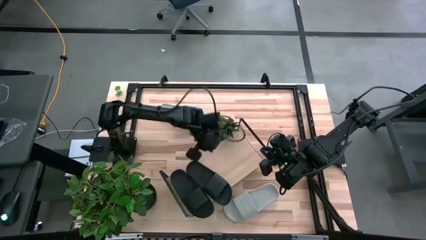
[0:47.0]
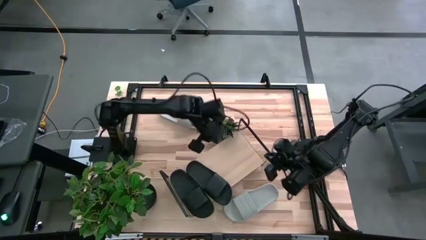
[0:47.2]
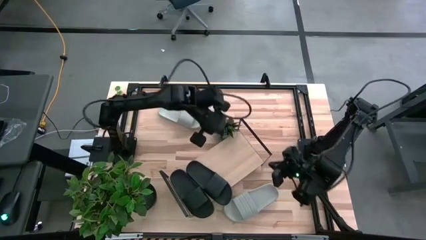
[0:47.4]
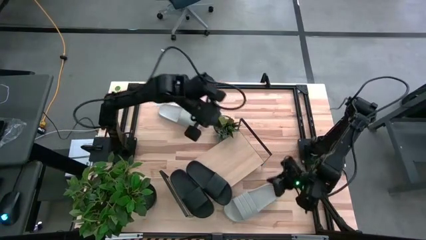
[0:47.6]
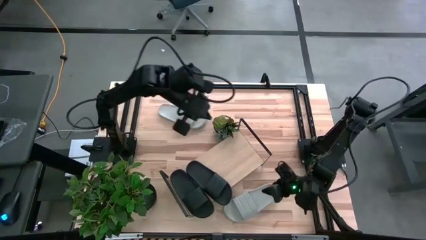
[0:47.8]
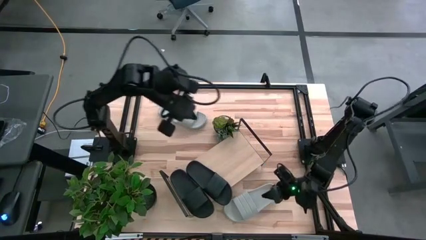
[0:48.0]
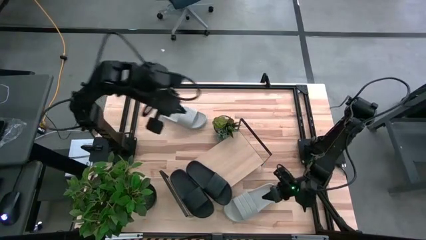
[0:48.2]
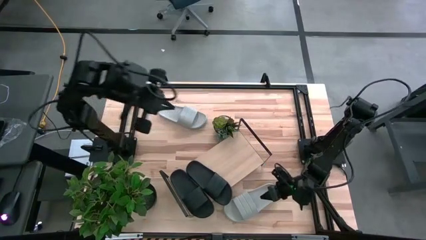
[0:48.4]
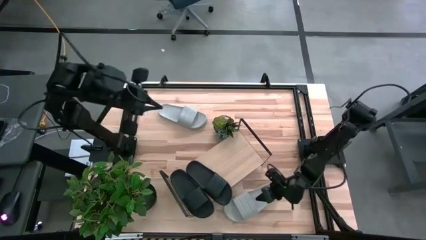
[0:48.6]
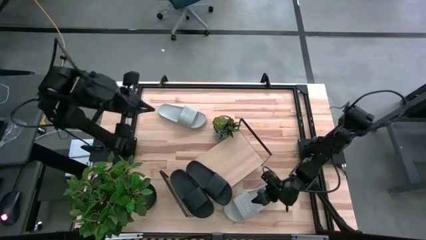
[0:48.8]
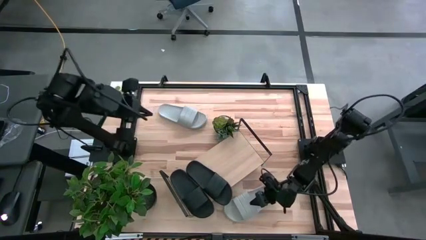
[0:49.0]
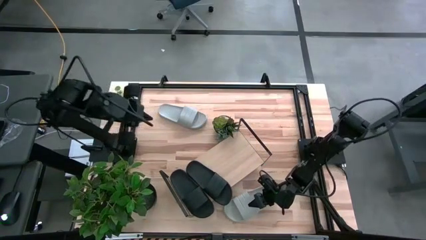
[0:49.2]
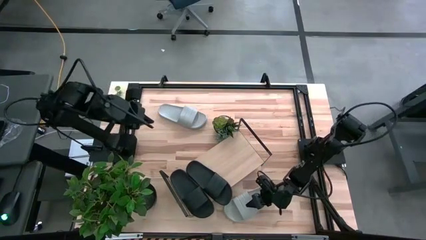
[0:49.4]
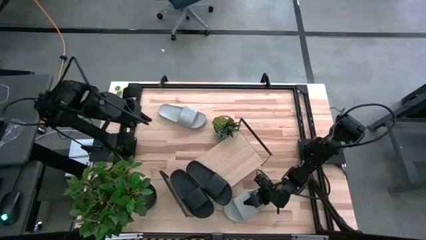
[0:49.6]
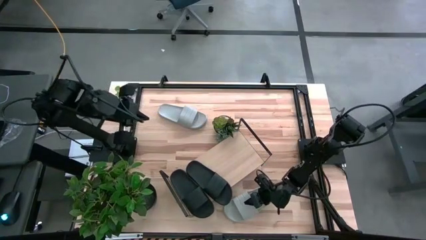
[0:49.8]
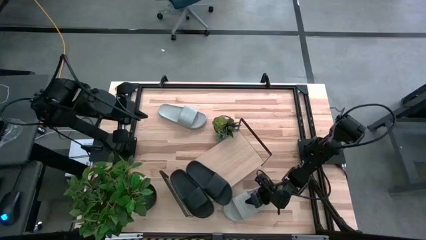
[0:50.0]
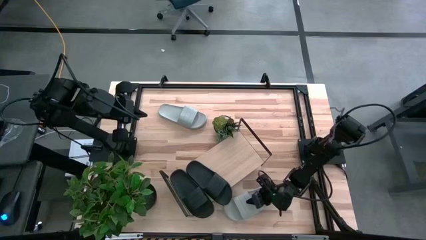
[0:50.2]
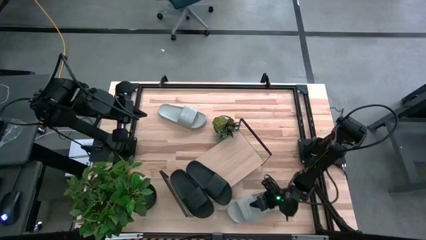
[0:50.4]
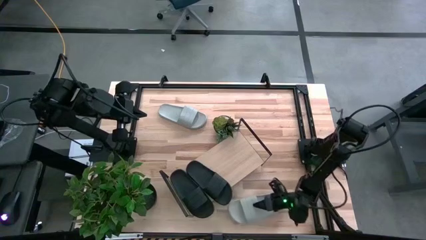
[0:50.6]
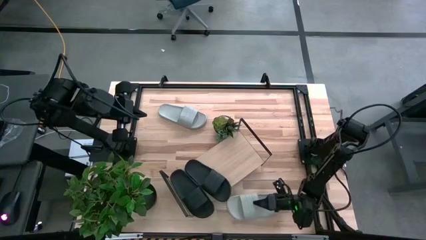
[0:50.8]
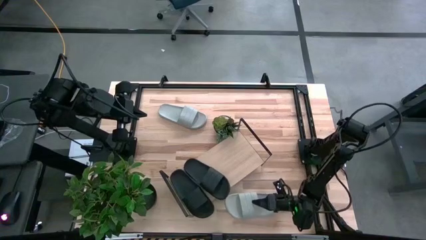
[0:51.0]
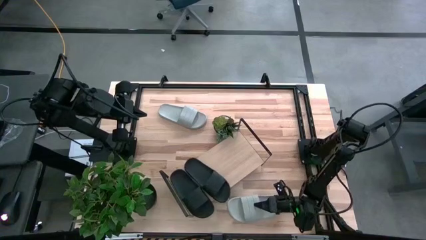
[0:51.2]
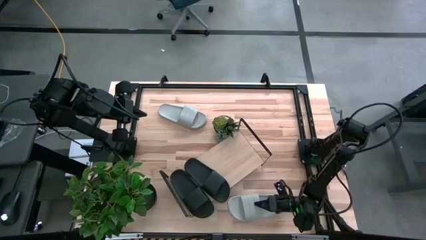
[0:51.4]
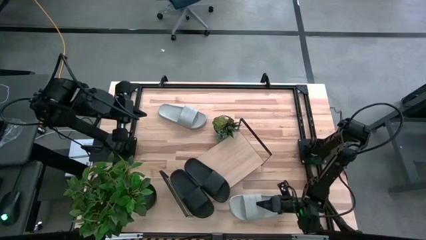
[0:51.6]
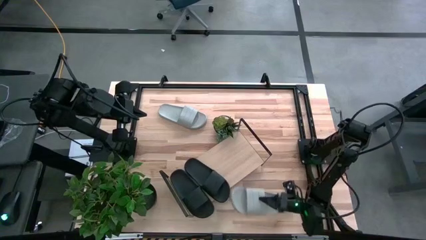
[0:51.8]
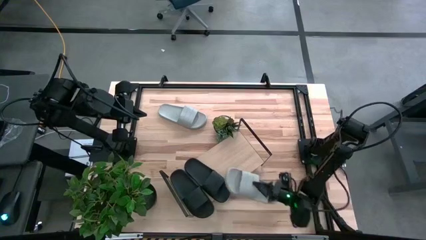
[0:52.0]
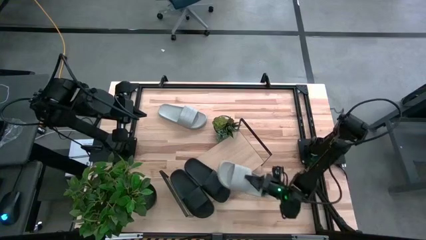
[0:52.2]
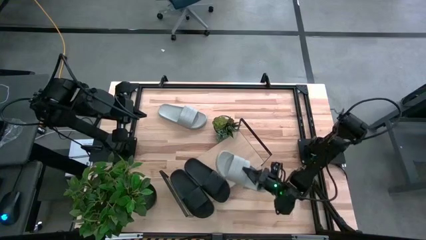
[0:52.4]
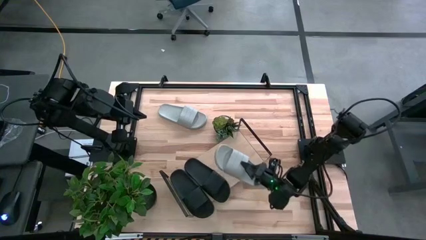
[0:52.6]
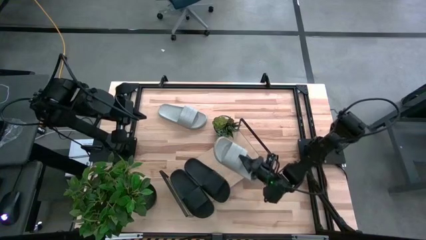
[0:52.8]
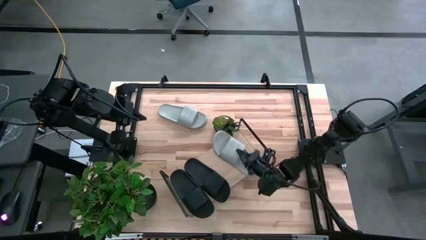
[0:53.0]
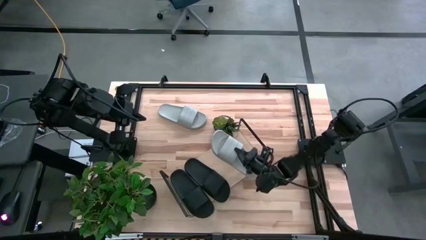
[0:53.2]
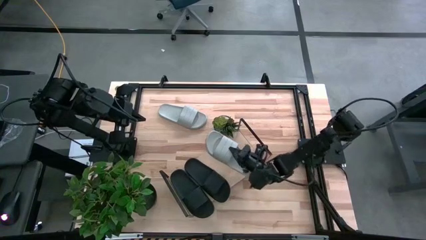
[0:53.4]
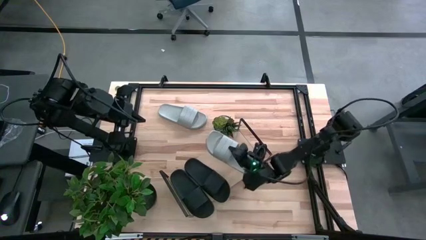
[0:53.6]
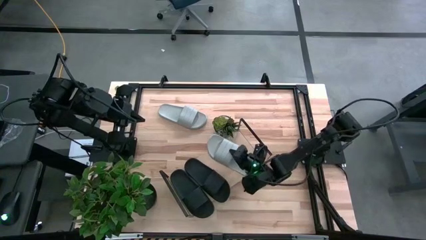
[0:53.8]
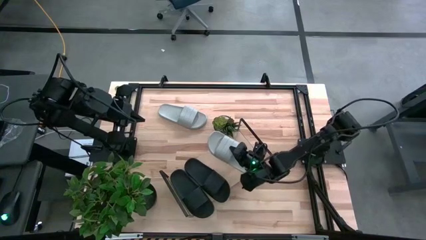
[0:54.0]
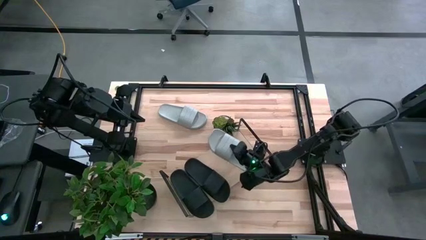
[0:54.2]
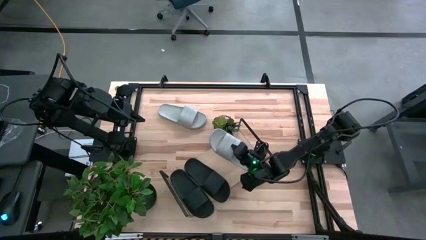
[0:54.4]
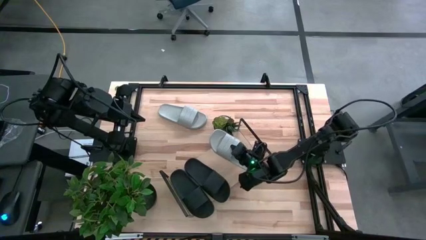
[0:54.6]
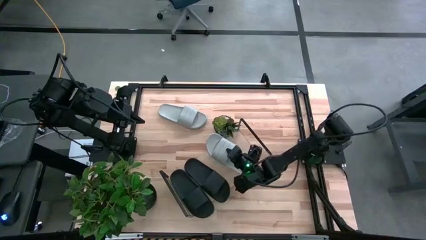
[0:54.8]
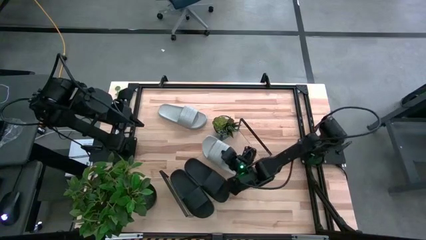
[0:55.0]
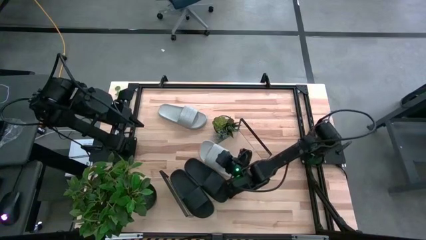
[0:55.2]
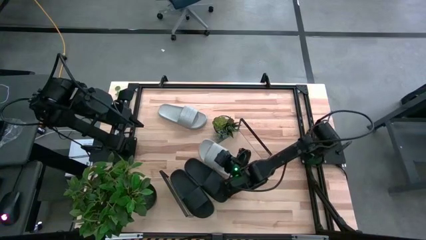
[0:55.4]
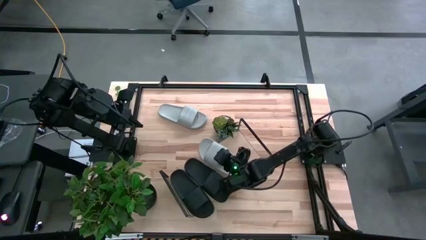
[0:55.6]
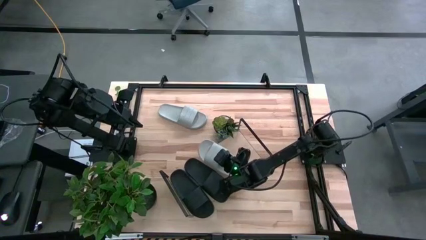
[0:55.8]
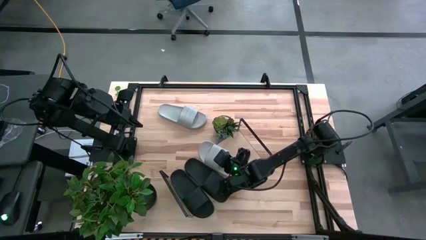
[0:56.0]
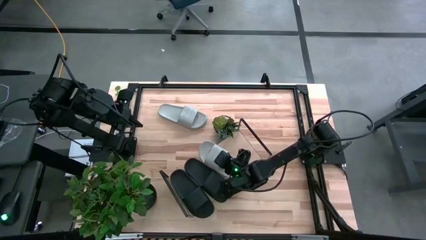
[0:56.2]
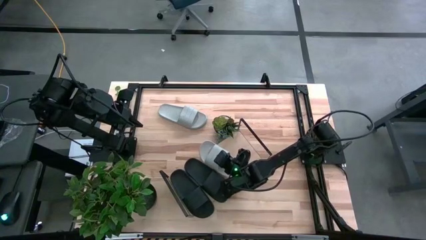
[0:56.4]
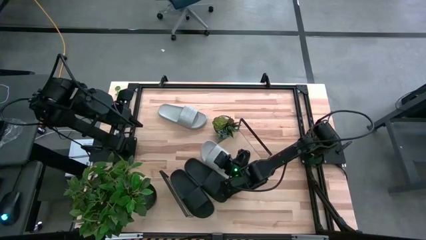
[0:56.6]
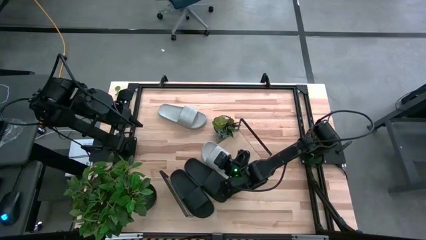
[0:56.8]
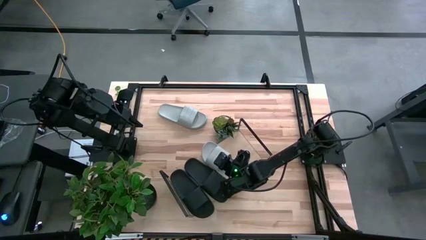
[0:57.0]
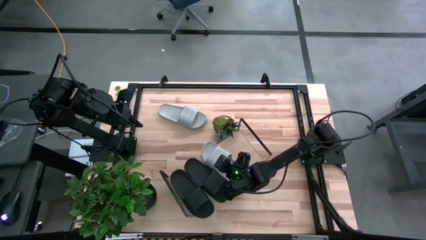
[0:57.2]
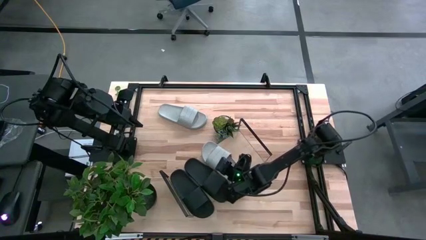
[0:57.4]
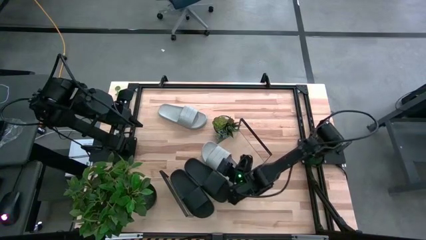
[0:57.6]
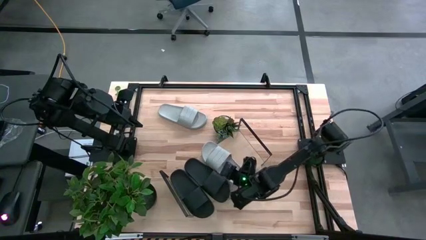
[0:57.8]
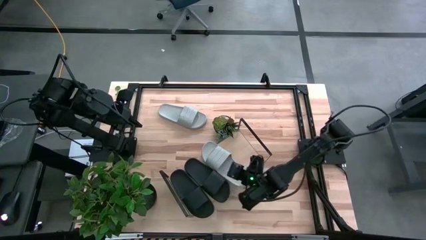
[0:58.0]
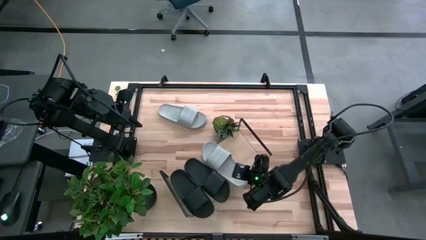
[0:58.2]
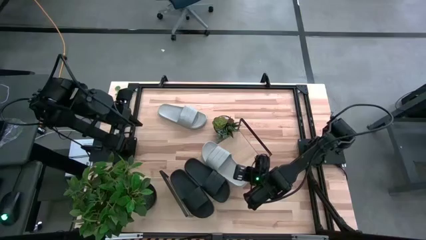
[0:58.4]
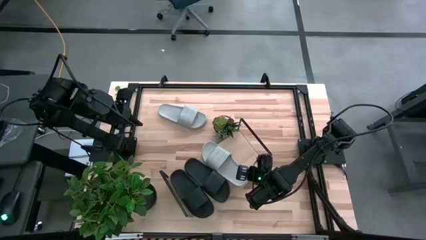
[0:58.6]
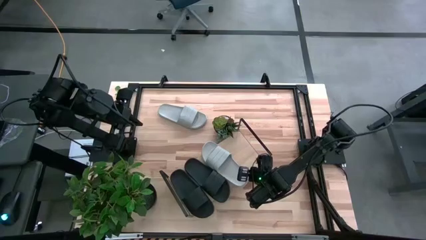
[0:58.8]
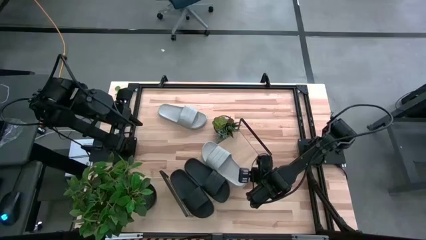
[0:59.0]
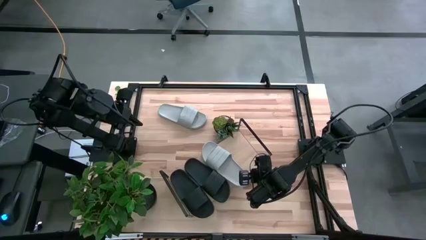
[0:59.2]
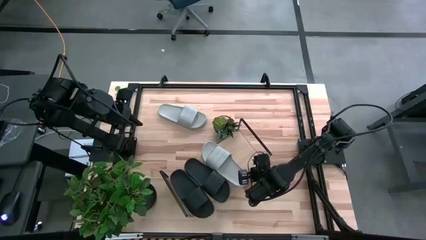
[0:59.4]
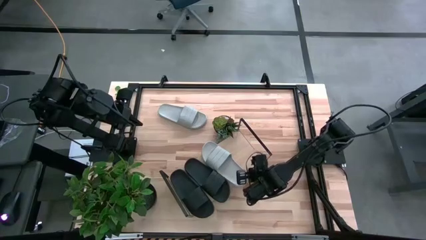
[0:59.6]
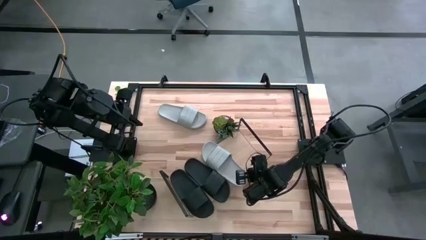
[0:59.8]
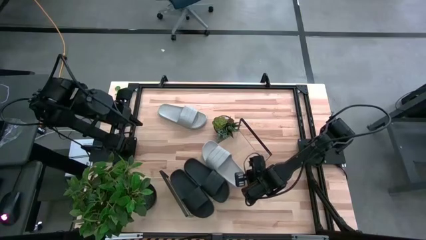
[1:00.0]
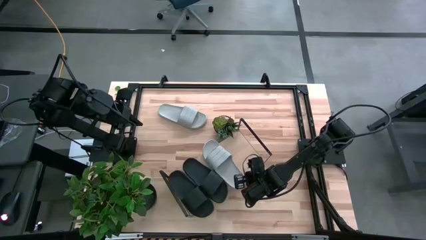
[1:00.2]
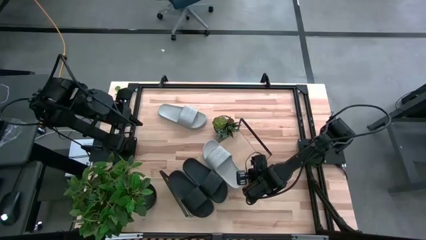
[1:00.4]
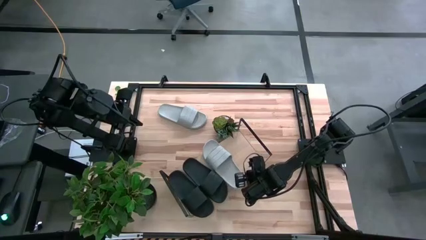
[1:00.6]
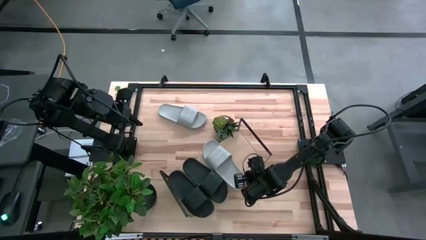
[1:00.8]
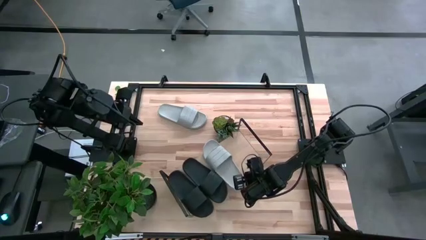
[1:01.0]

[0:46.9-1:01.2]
Task: Pick and place slides into the shelf
Put the bottom gray slipper on the shelf
